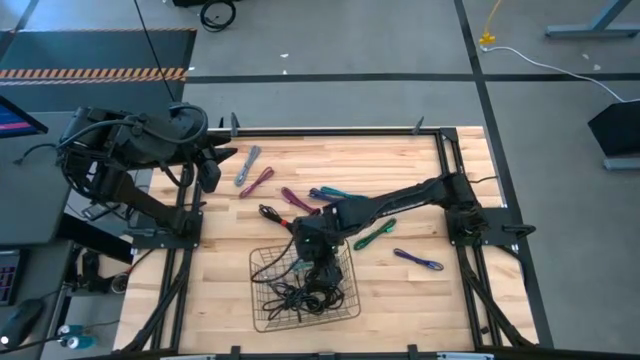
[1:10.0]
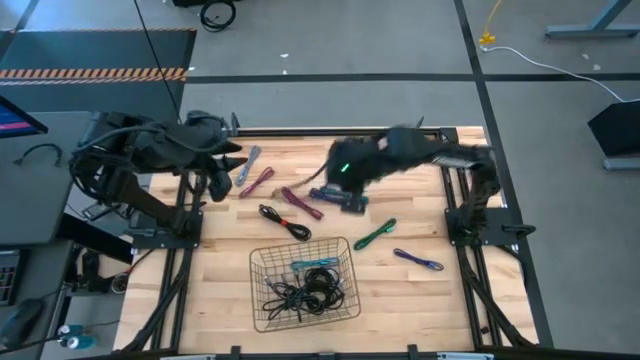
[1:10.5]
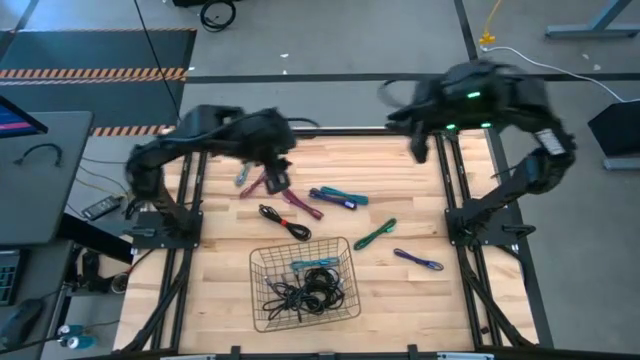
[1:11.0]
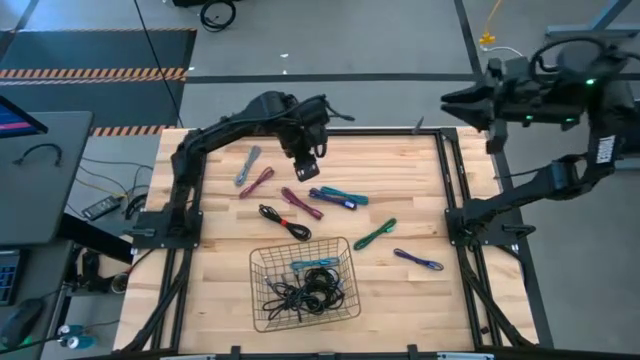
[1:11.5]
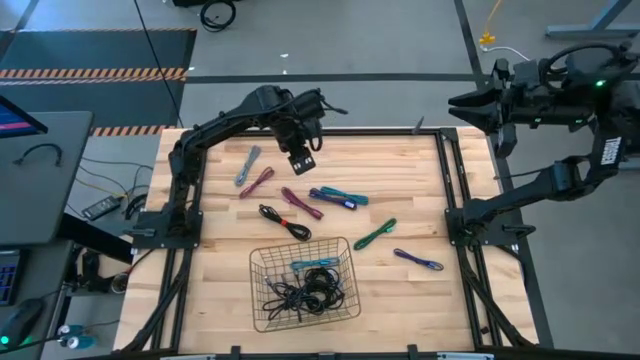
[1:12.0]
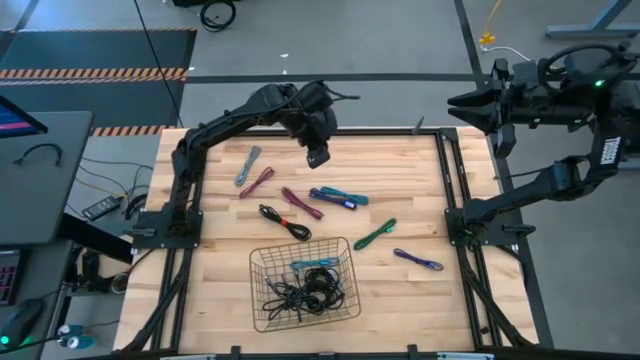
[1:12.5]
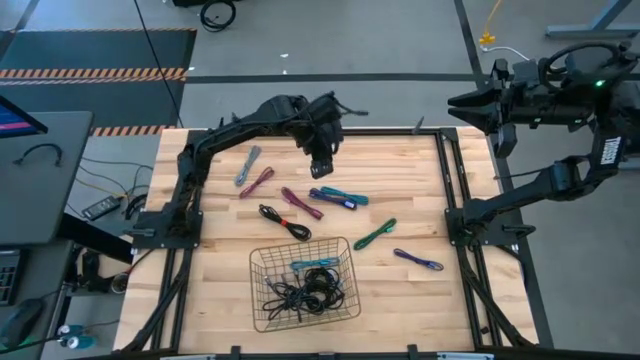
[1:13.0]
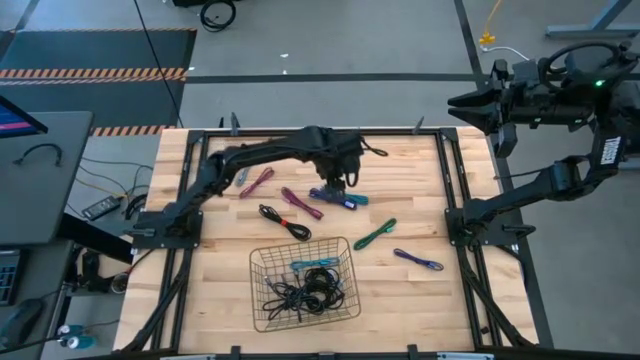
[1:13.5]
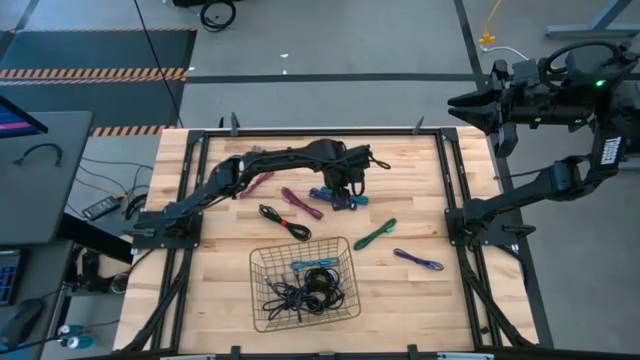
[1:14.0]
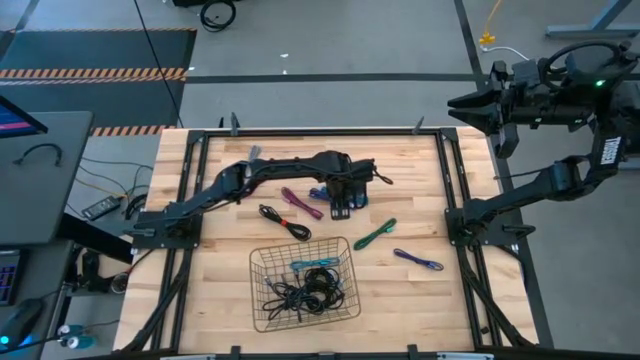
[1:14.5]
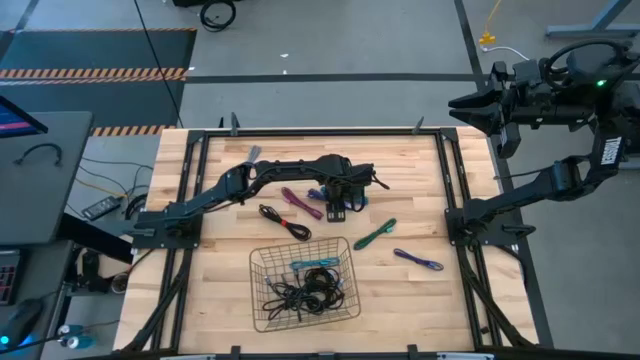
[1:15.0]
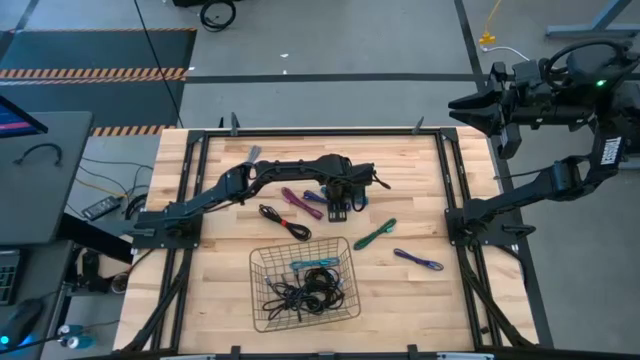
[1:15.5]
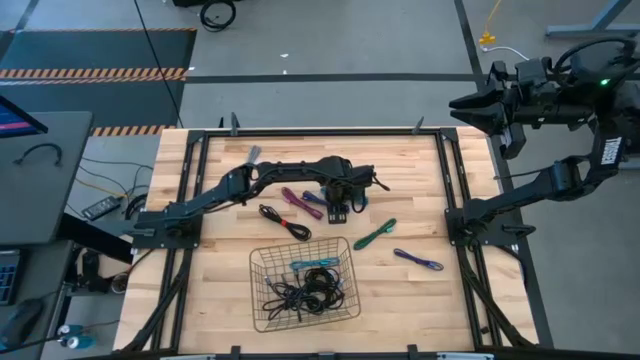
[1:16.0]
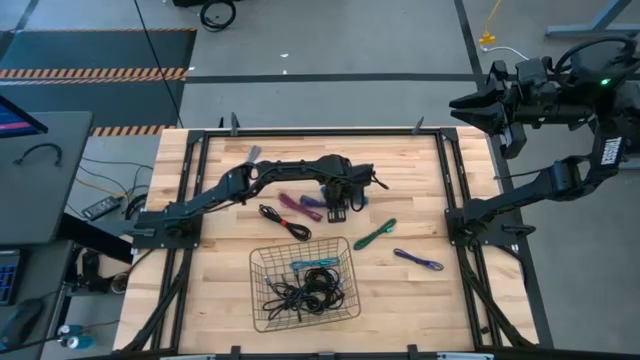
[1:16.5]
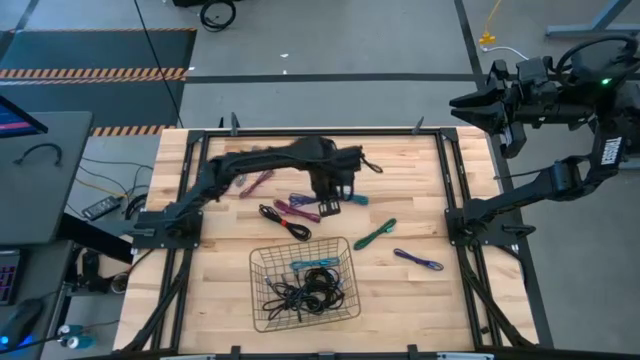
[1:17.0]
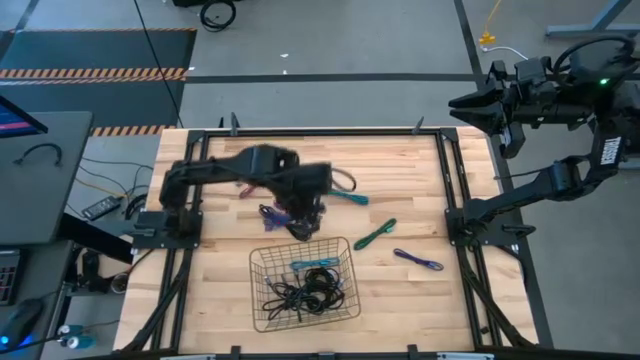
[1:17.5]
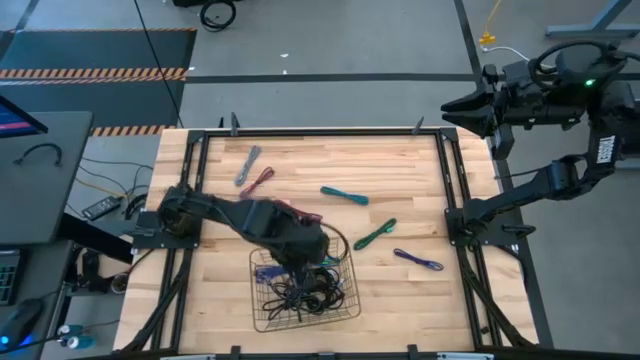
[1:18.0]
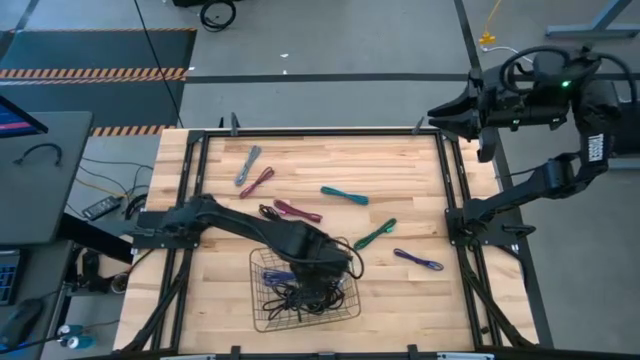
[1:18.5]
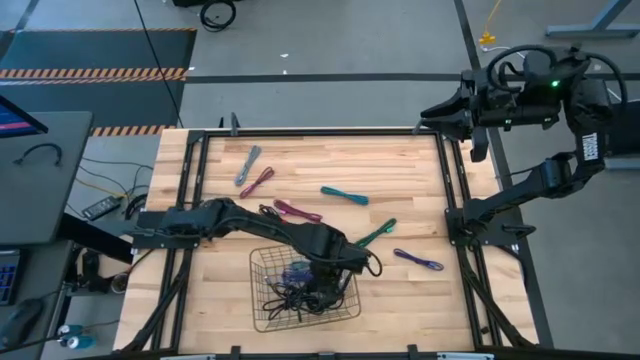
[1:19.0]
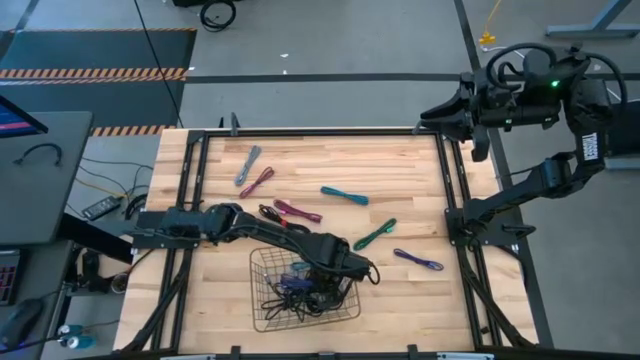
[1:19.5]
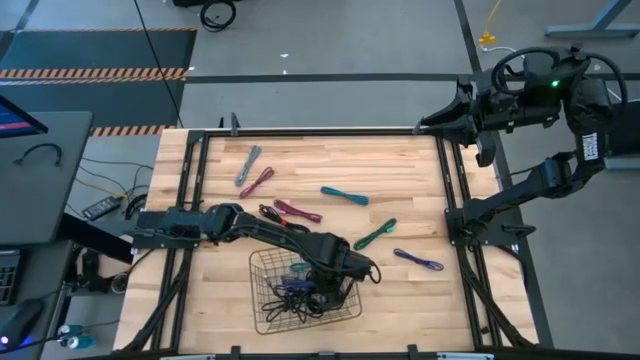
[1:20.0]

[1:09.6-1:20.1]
Task: Pick and place USB-C Cables
Put the purple charger cable into the wire basket

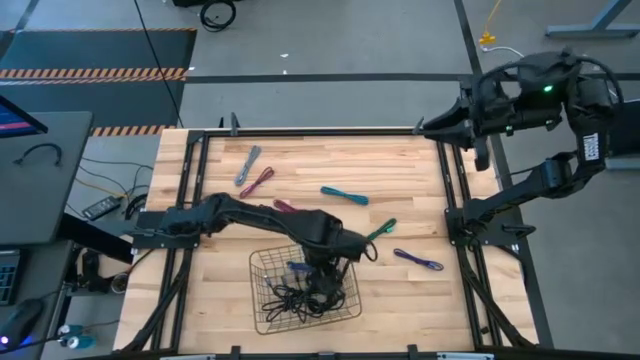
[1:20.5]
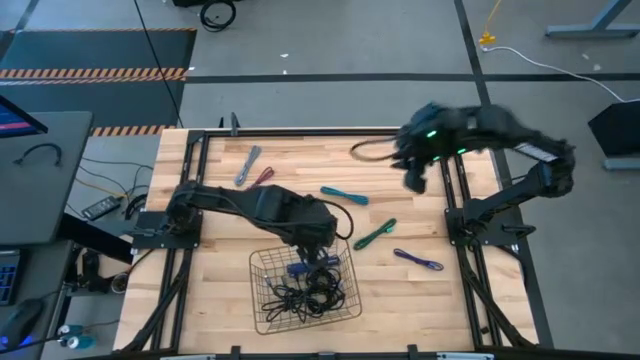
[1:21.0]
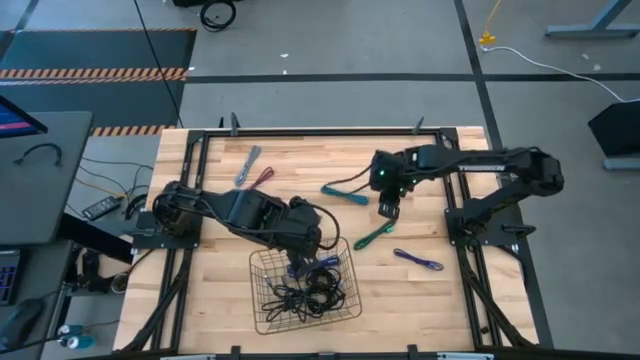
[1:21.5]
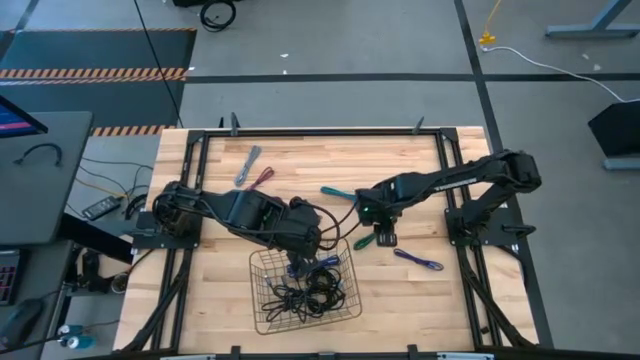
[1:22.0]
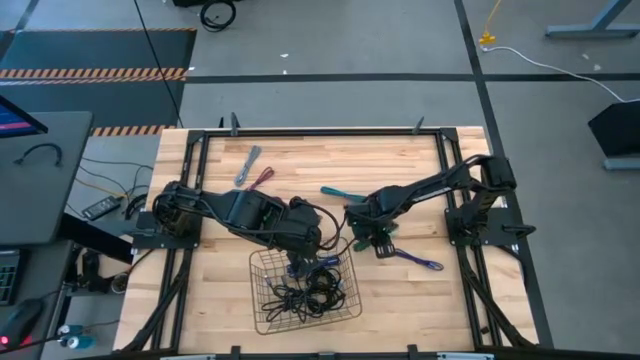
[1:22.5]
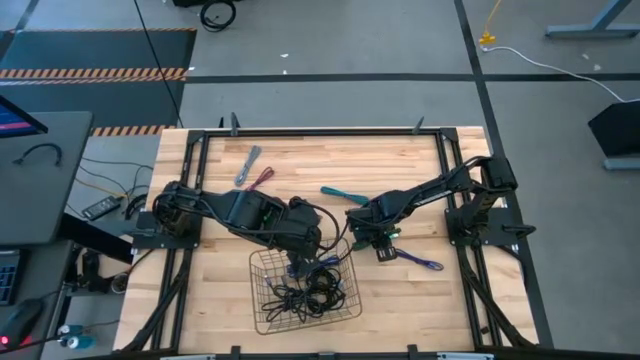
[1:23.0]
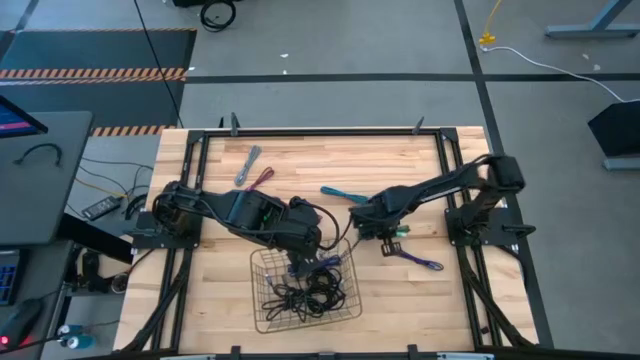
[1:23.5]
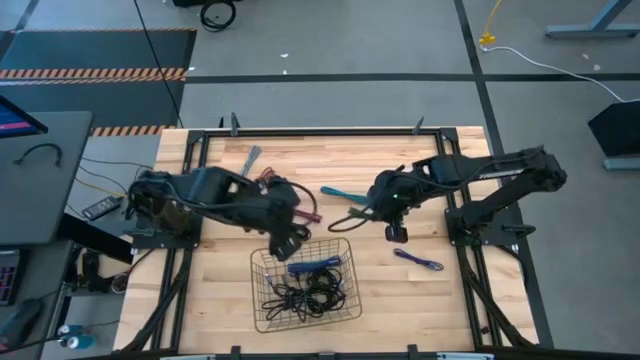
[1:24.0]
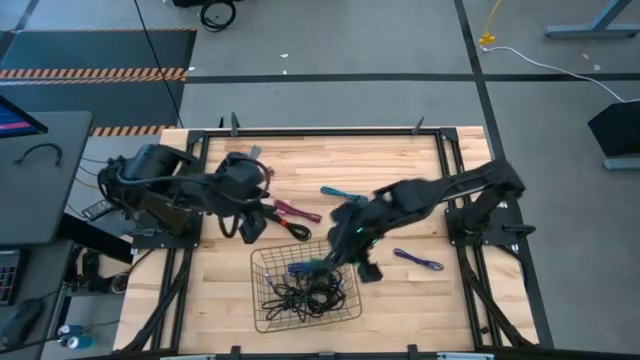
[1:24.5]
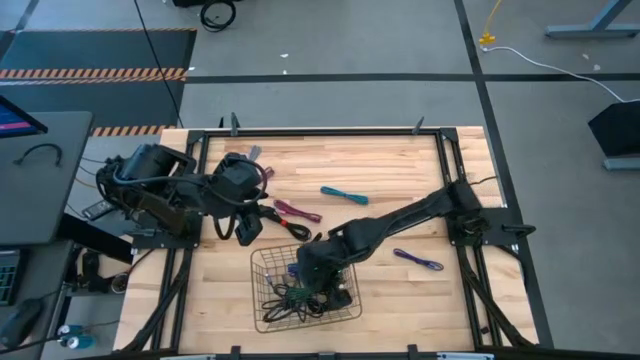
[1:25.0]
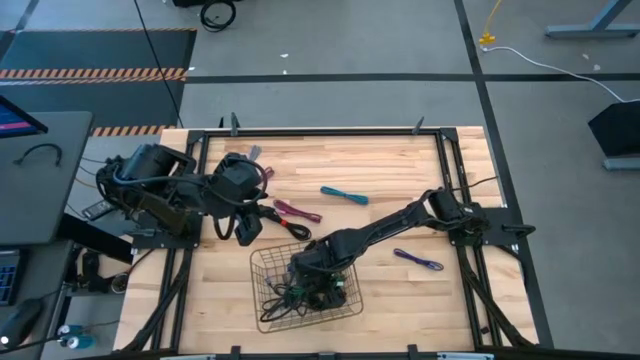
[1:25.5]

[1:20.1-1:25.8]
Put the green charger cable into the wire basket

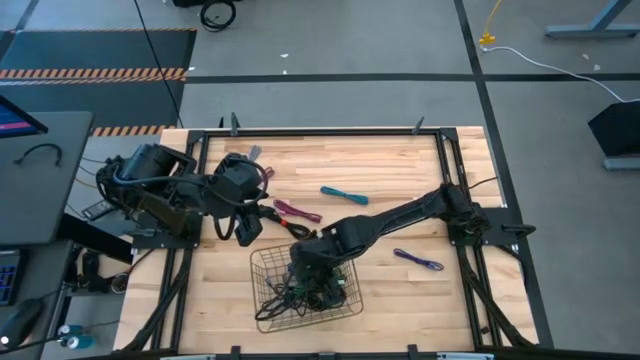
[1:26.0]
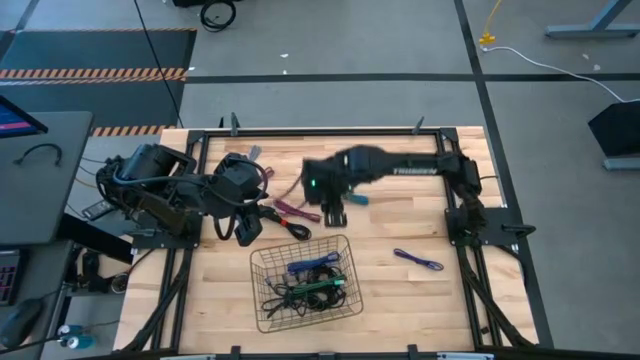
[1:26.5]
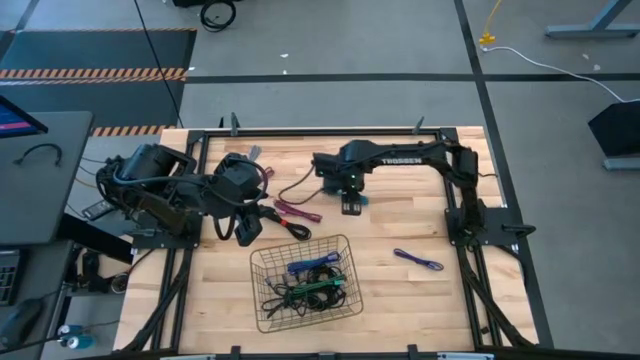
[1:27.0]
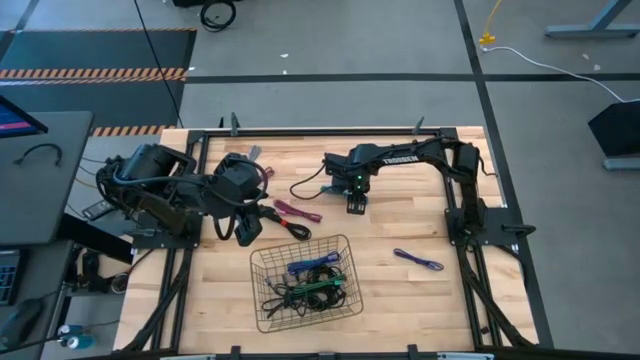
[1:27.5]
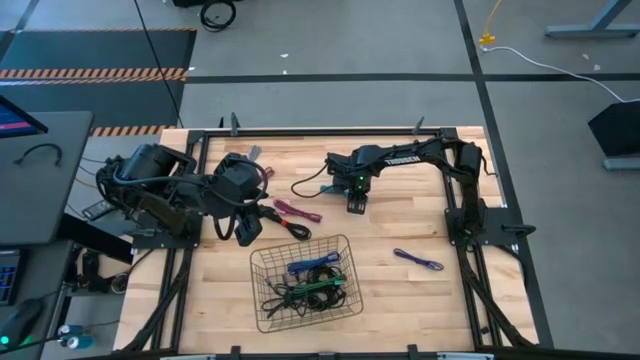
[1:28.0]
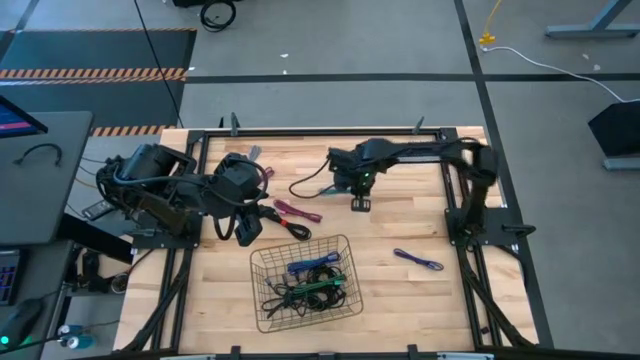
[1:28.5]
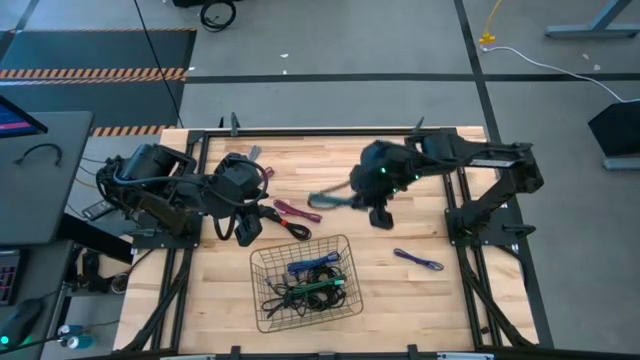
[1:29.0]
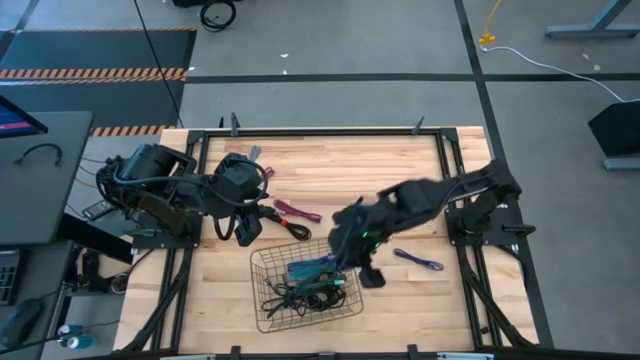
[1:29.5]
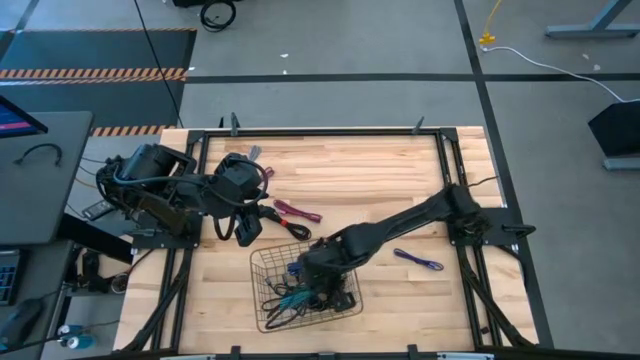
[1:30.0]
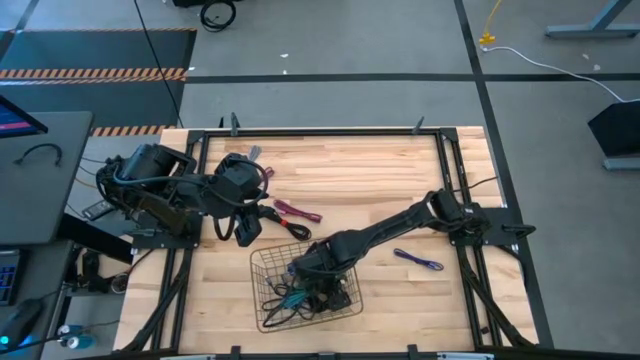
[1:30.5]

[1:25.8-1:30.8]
Put the light blue charger cable into the wire basket
